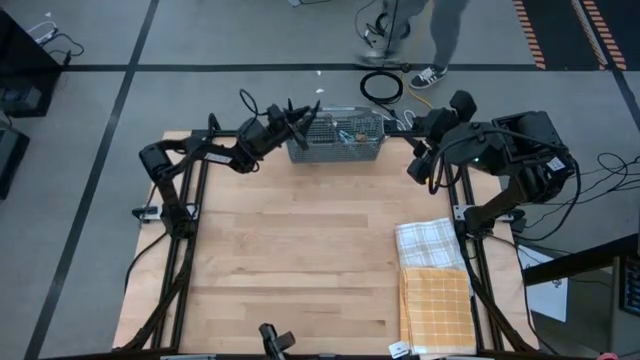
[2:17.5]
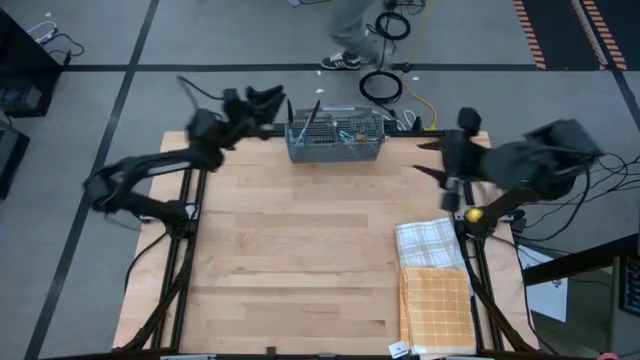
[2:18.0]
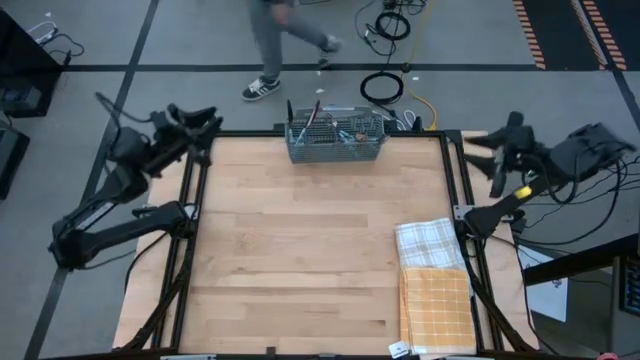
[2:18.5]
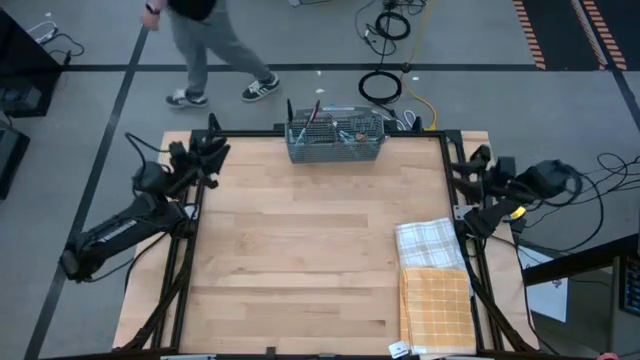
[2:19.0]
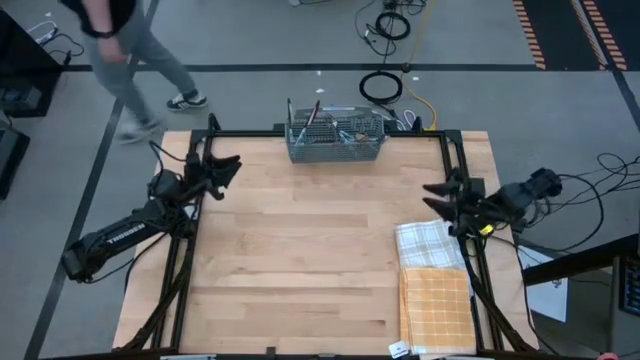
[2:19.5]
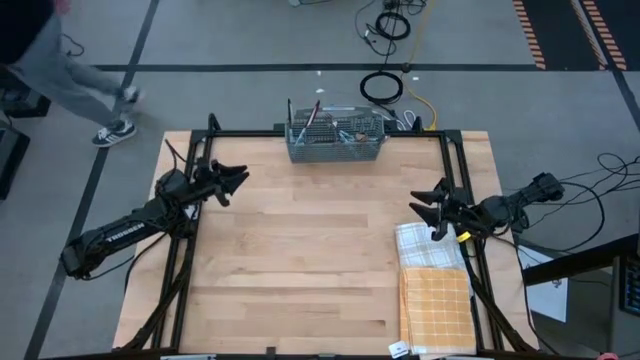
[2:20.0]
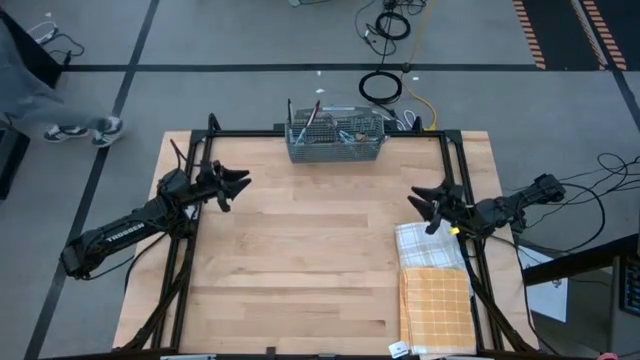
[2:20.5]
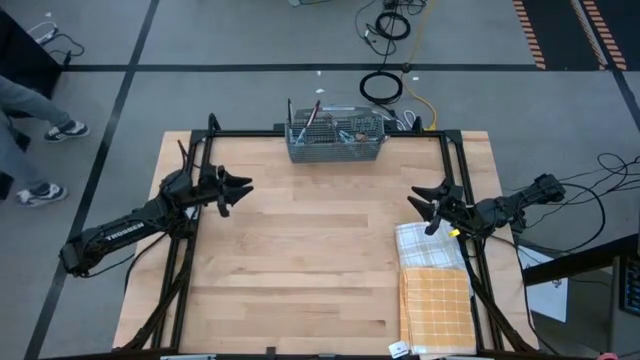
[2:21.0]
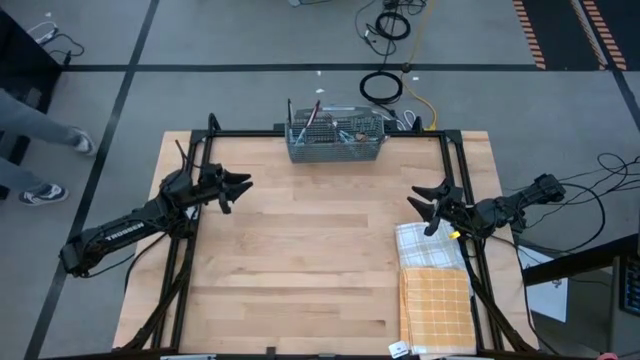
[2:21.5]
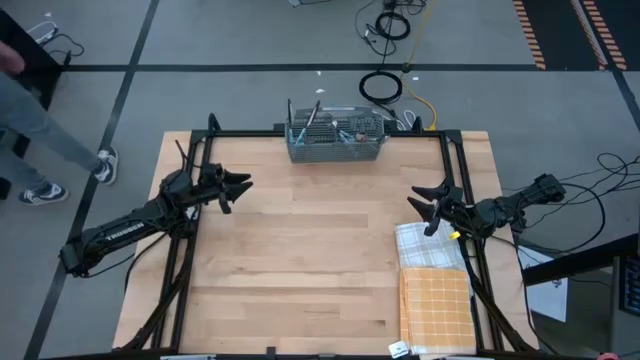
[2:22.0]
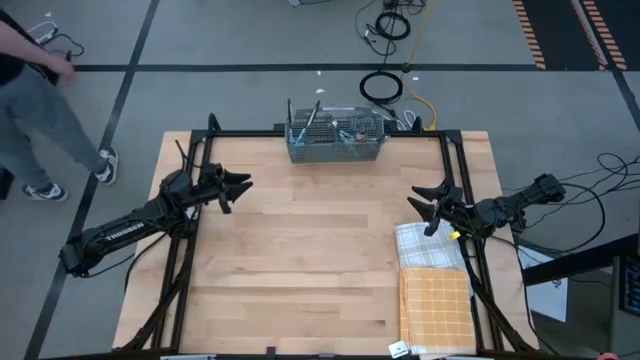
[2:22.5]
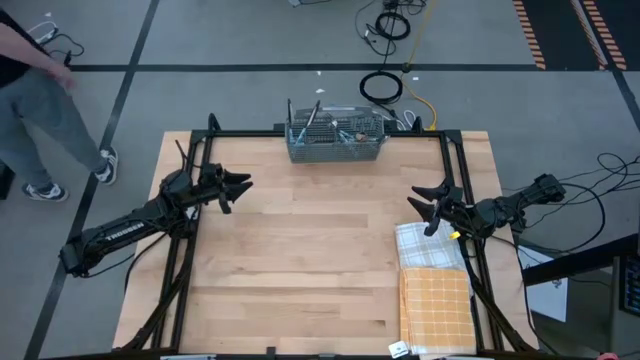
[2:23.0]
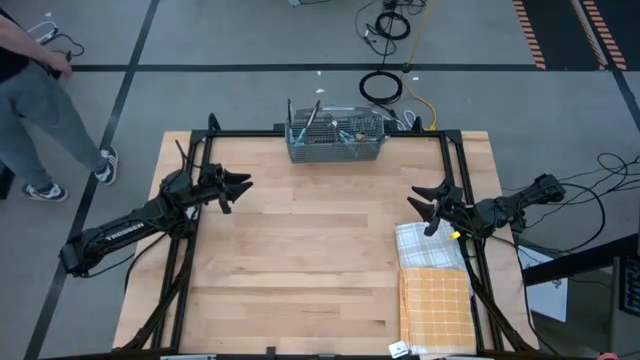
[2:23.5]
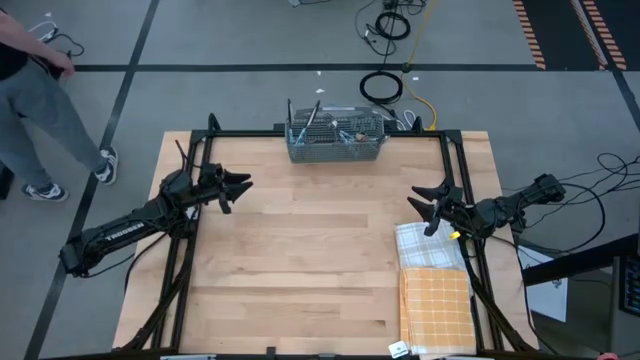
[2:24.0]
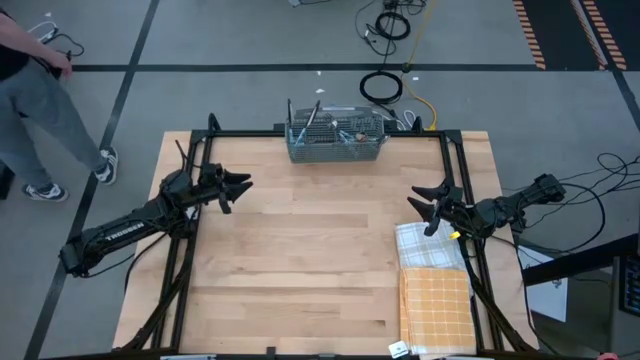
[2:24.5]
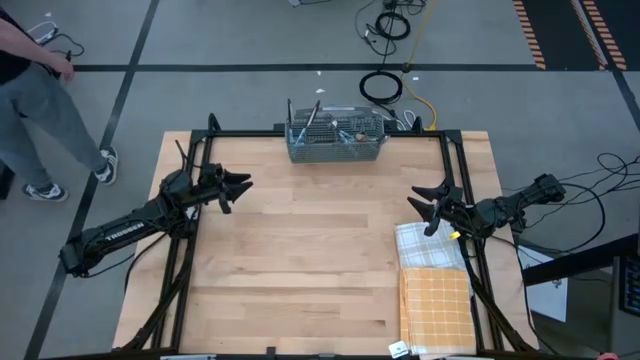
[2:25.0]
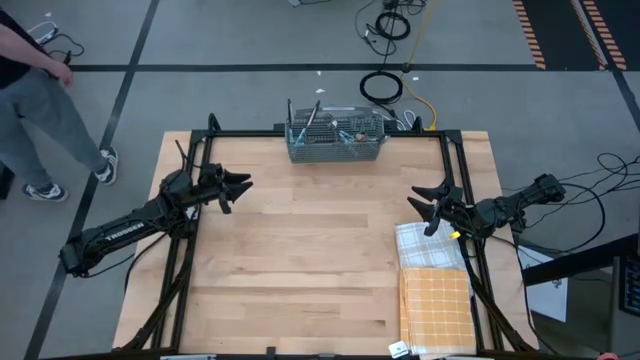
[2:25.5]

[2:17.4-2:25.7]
Task: Sort silverware
Return to Home Position

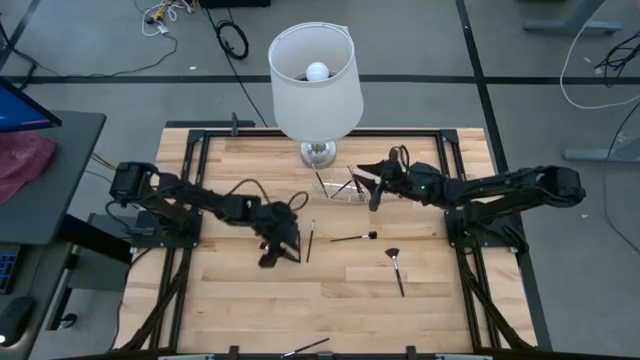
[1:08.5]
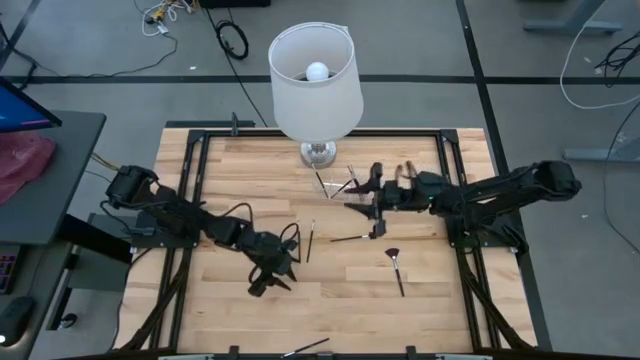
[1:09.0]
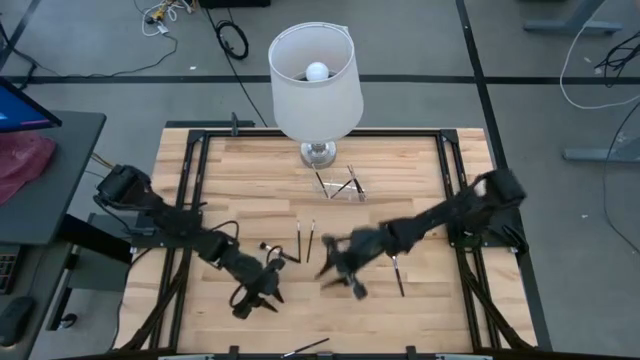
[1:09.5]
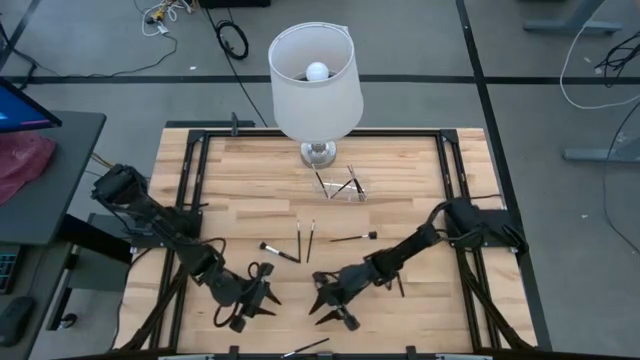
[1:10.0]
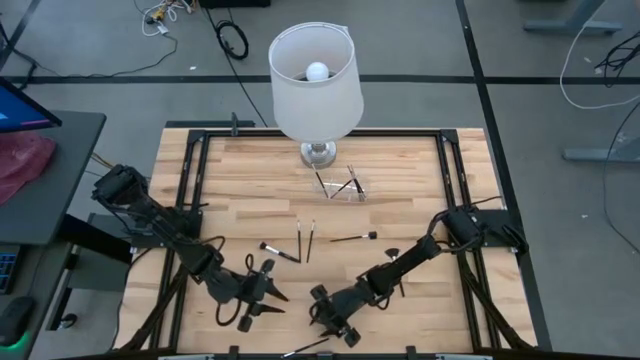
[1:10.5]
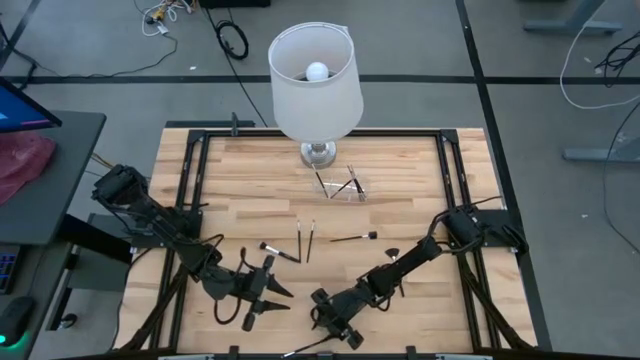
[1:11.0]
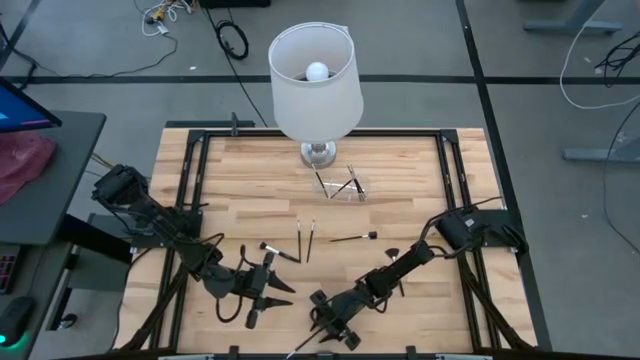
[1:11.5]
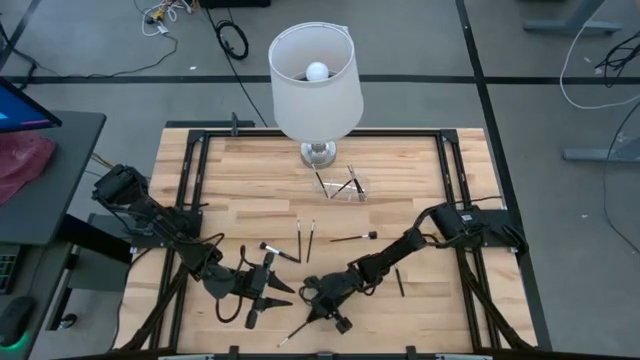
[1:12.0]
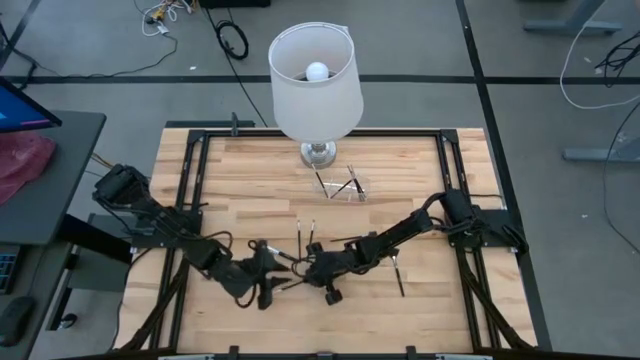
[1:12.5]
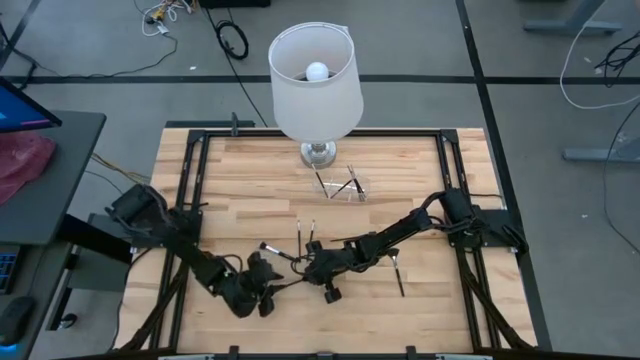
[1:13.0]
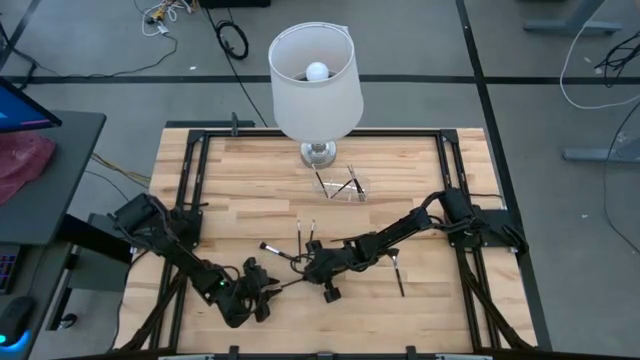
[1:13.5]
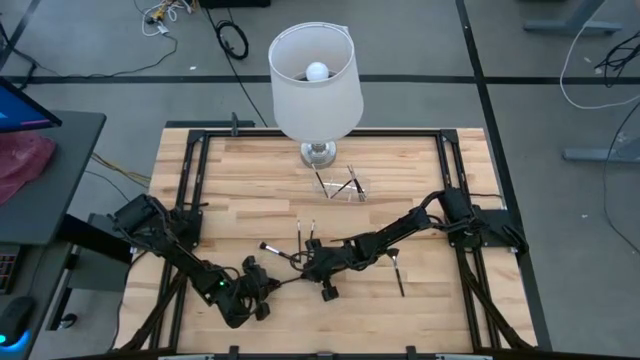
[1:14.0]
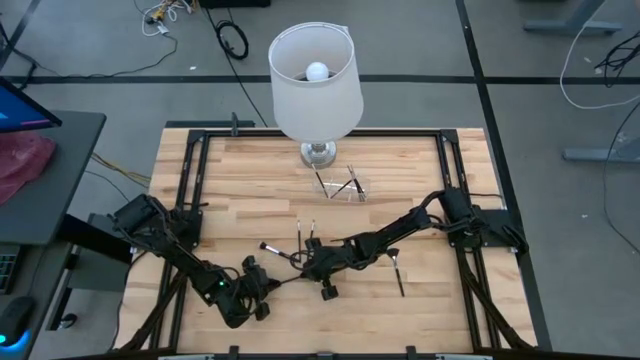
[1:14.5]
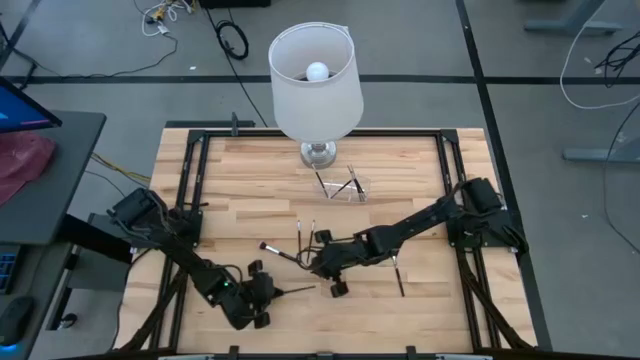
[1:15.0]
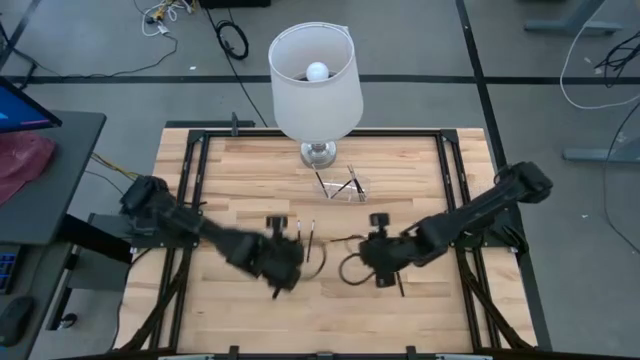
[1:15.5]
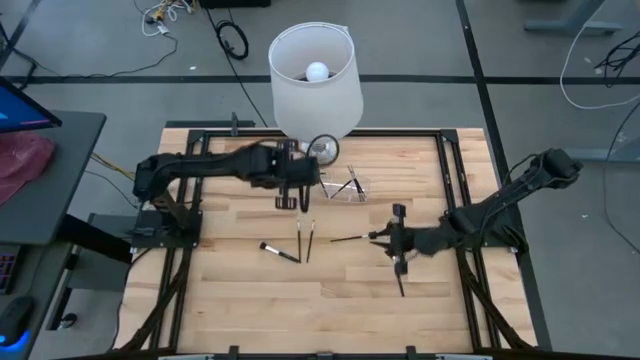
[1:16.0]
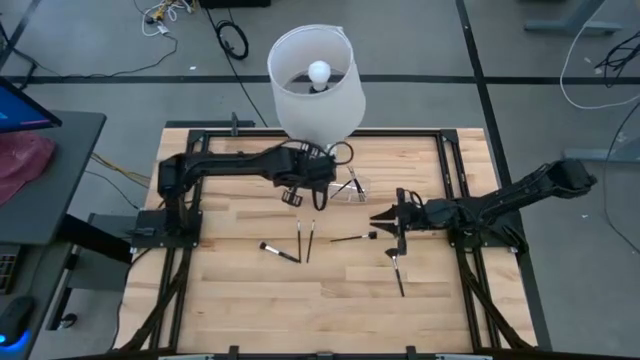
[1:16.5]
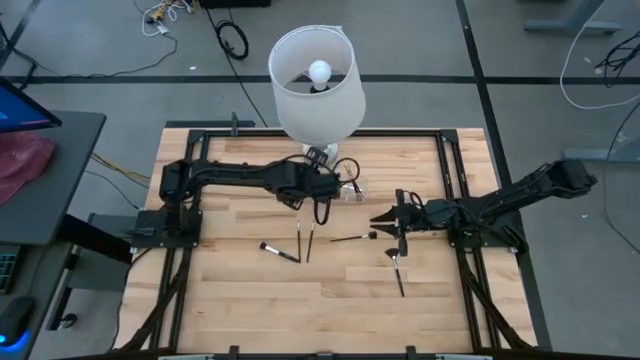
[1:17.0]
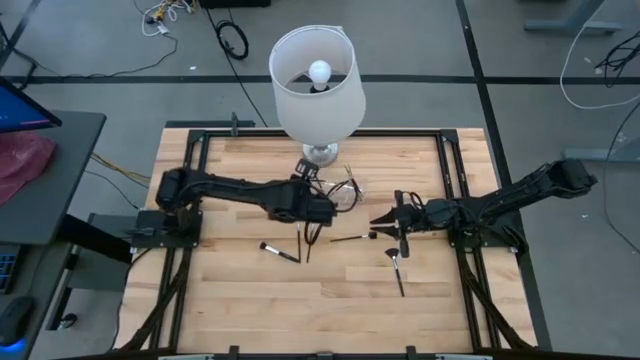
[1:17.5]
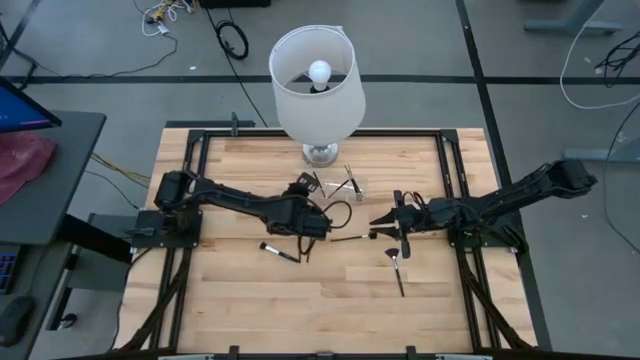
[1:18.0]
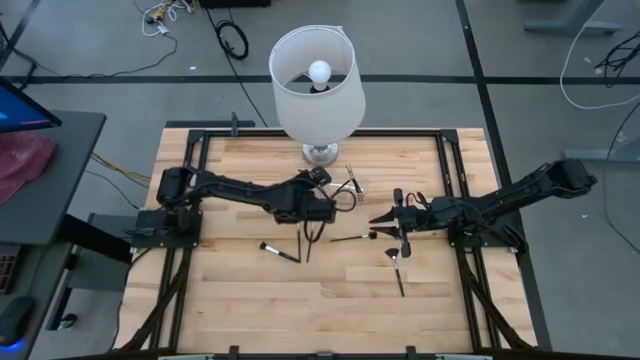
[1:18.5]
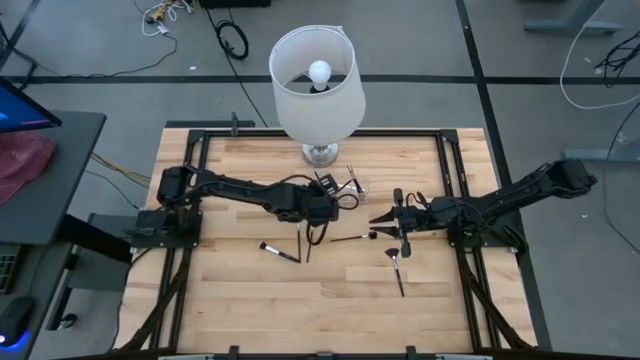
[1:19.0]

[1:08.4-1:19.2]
Task: Put items in baskets/containers
Put the black eyeshadow brush into the transparent organizer
